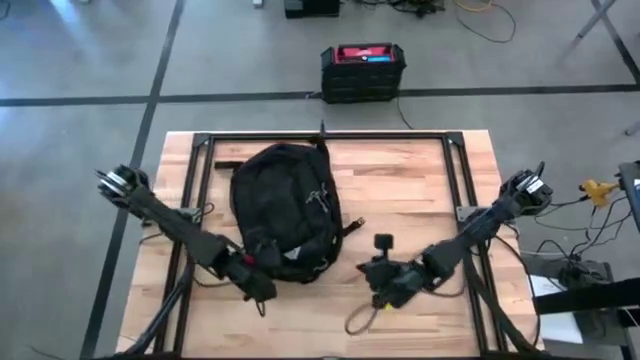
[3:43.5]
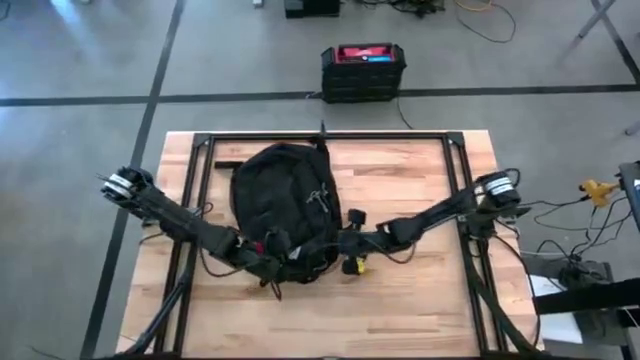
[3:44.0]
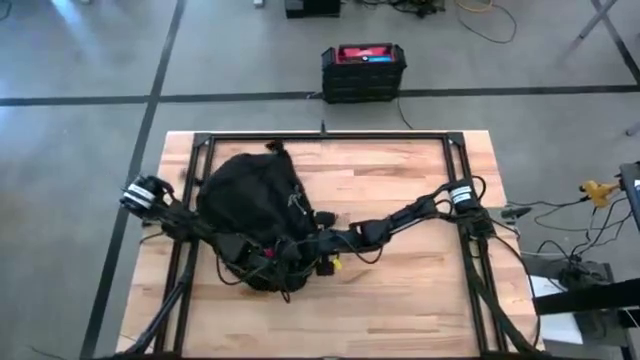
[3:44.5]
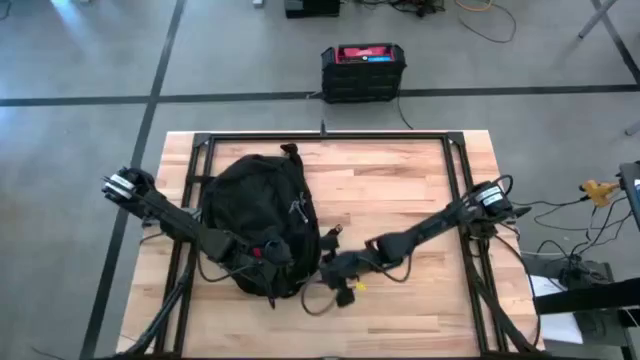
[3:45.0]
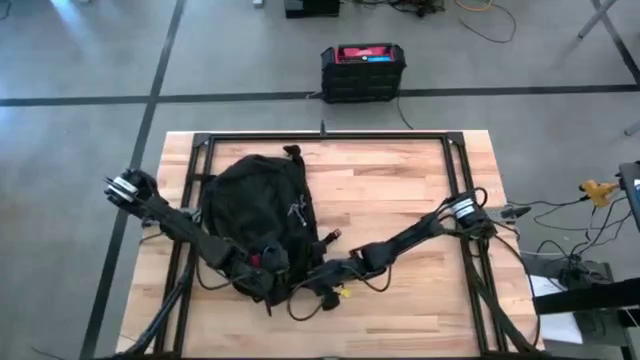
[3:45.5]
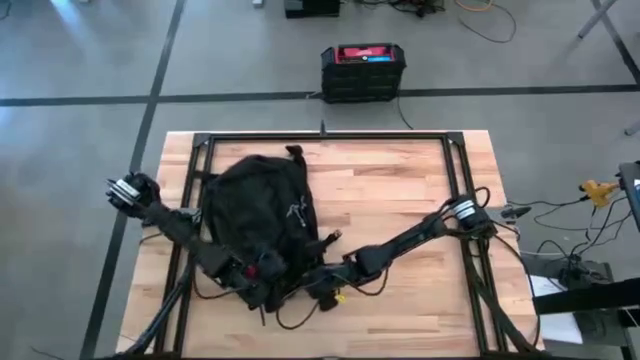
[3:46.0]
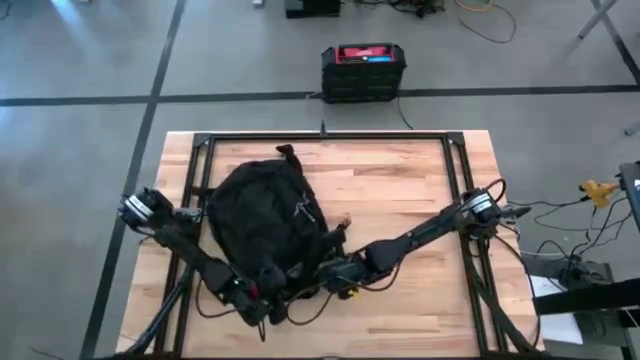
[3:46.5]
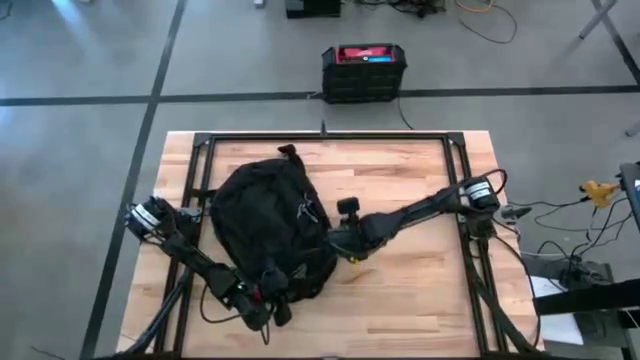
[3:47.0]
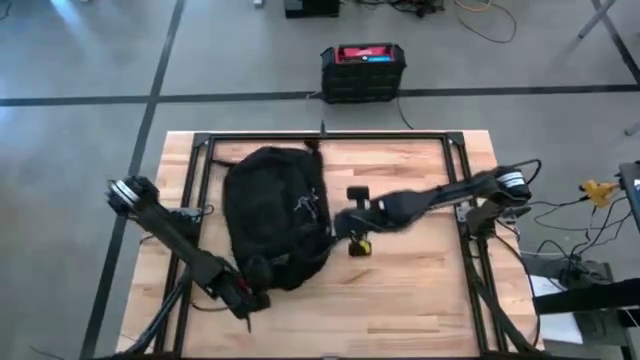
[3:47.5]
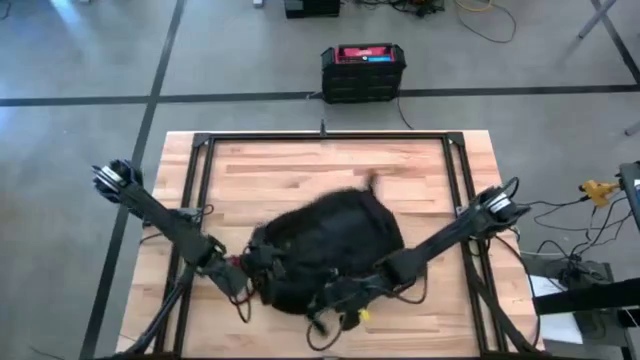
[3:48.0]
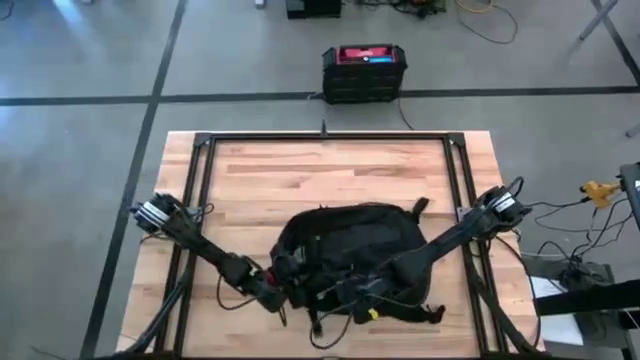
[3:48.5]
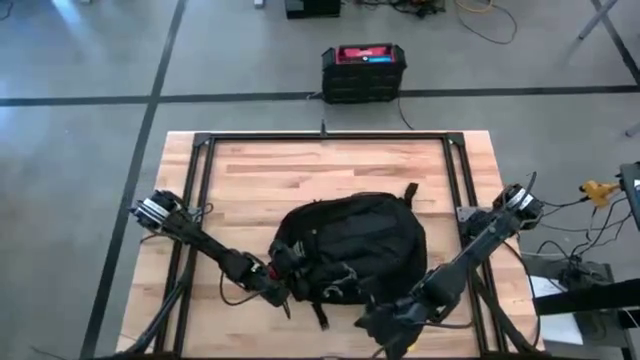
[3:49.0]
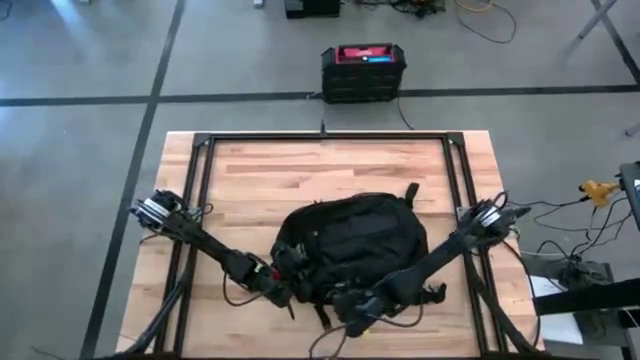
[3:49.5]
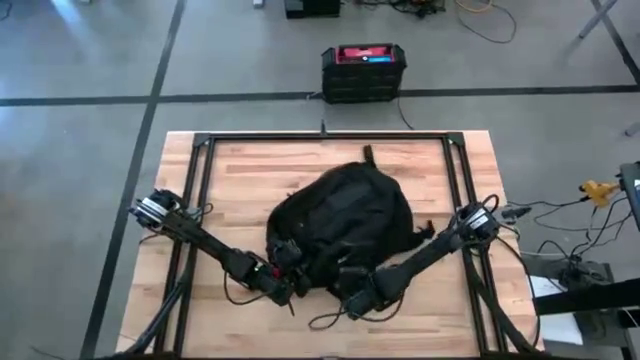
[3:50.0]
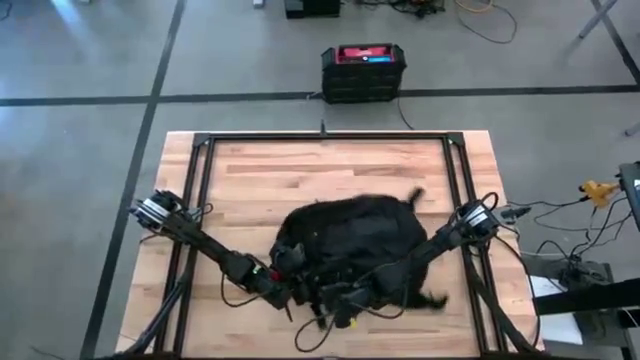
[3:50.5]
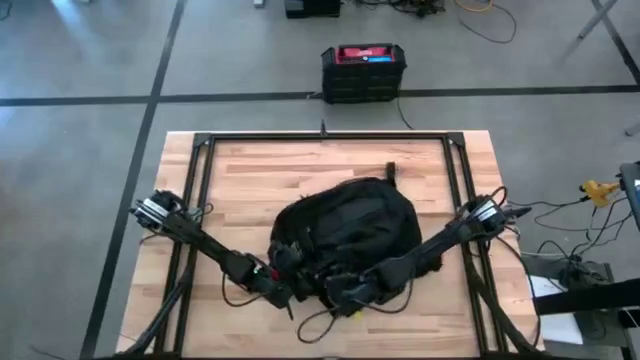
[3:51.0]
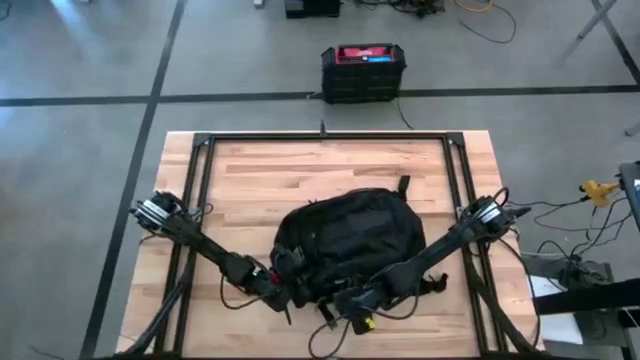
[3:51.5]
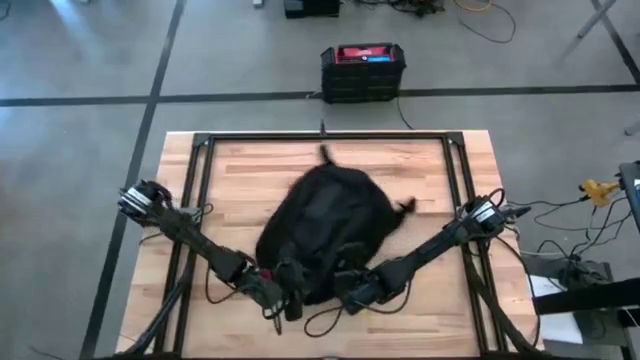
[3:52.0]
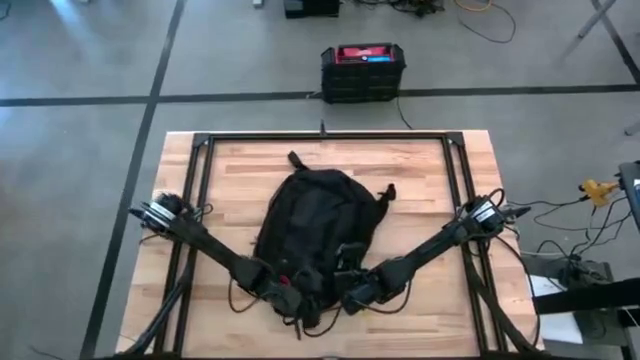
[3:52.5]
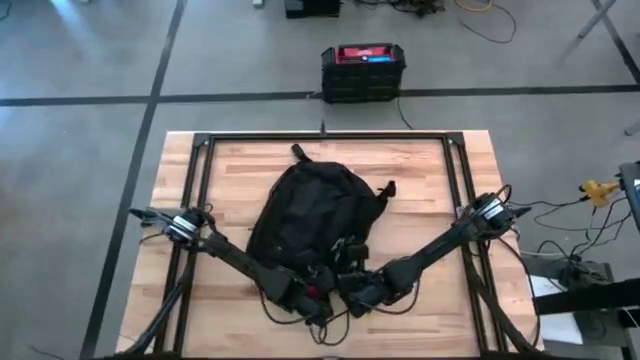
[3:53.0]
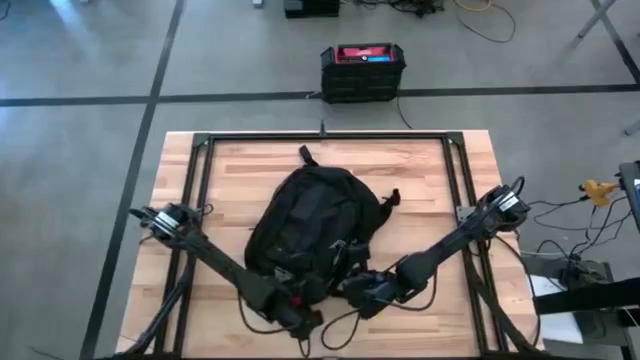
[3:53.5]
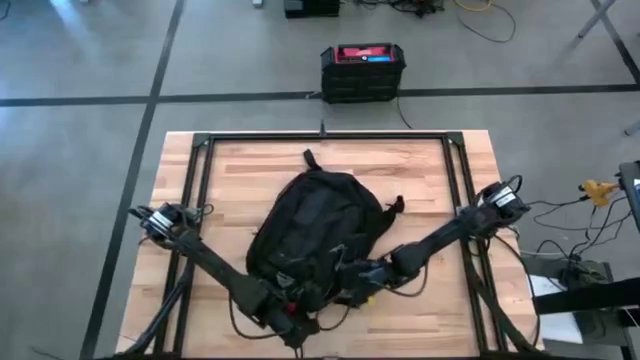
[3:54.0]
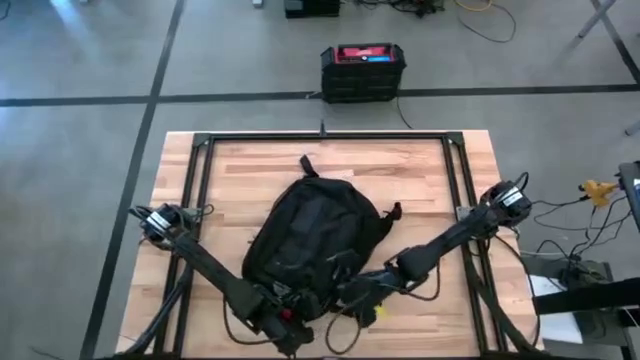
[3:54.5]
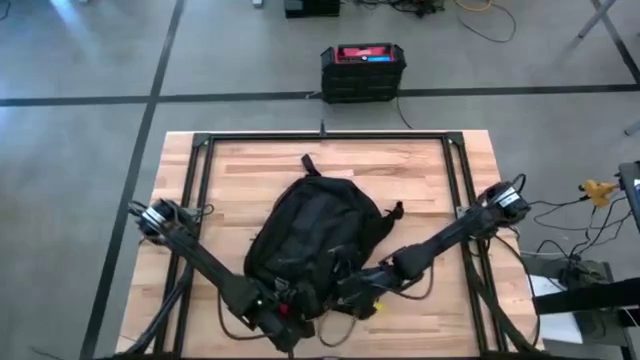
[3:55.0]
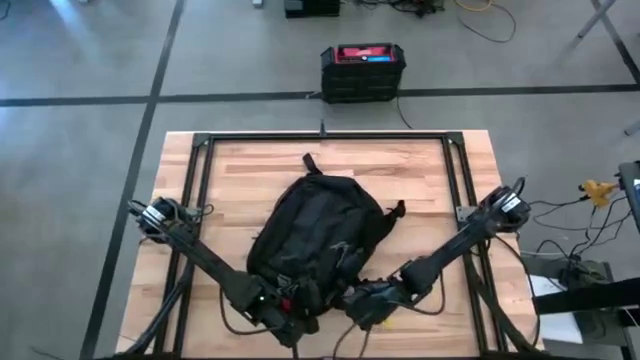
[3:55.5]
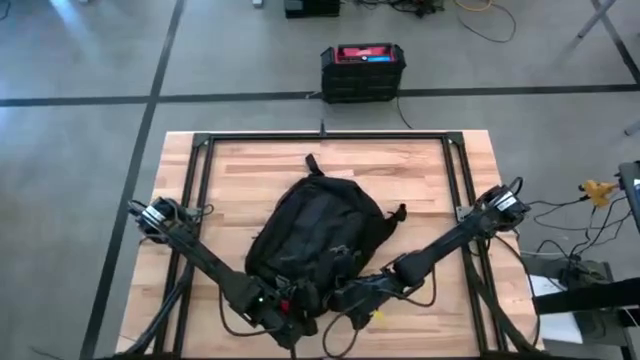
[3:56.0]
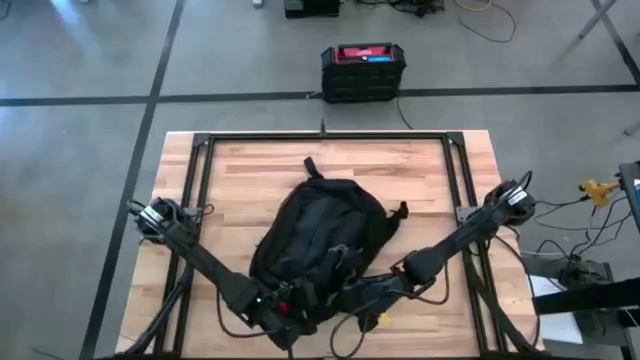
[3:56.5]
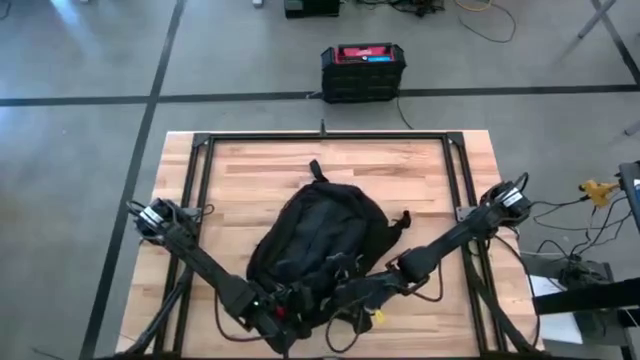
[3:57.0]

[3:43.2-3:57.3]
Task: Unpack backpack
Close the black backpack

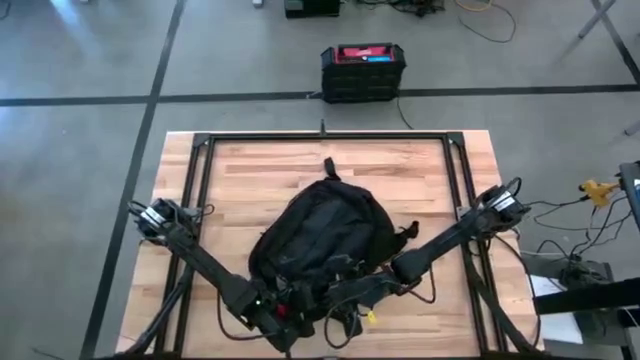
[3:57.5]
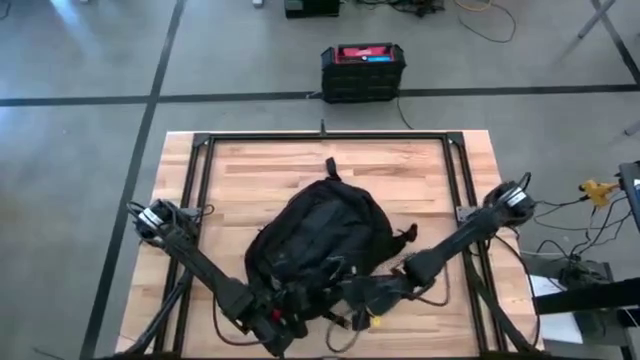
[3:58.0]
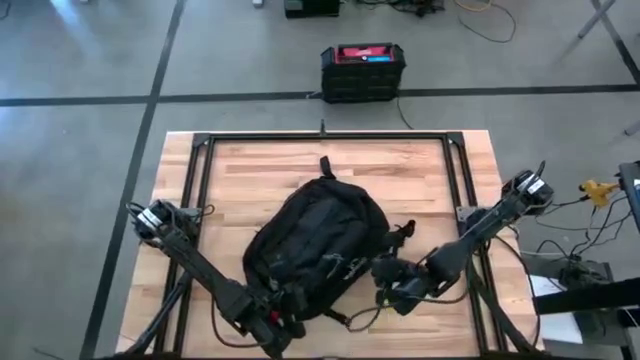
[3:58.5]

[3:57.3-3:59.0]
Close the black backpack

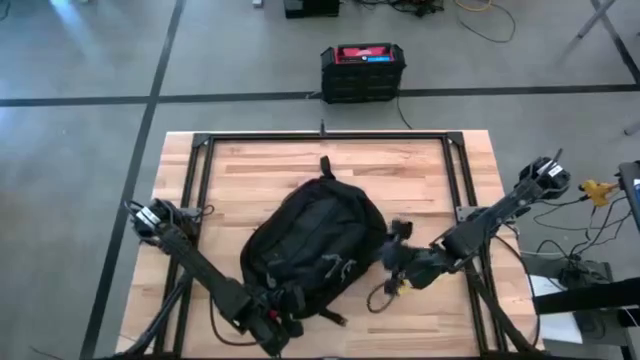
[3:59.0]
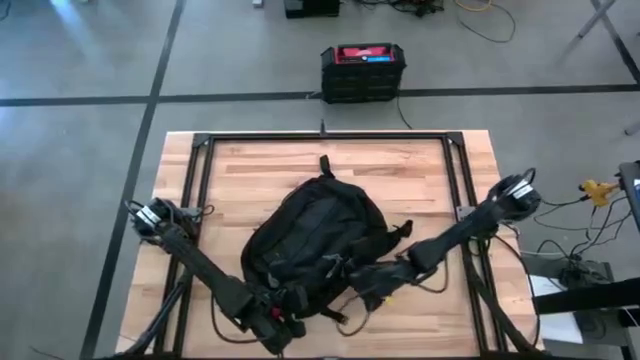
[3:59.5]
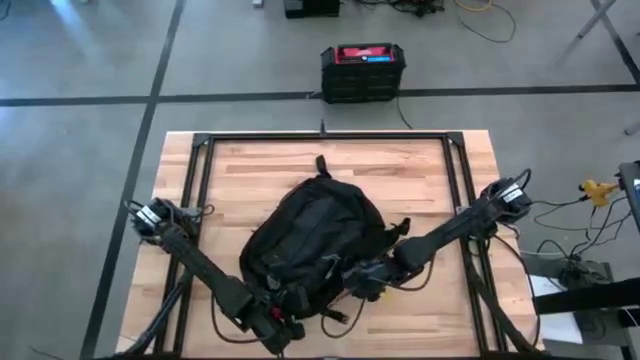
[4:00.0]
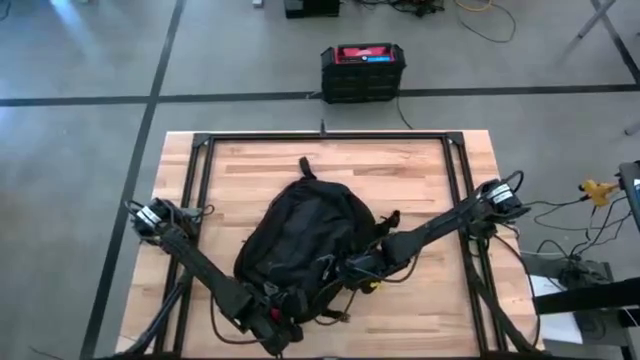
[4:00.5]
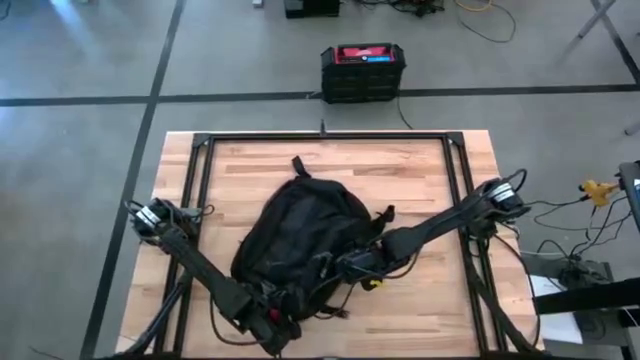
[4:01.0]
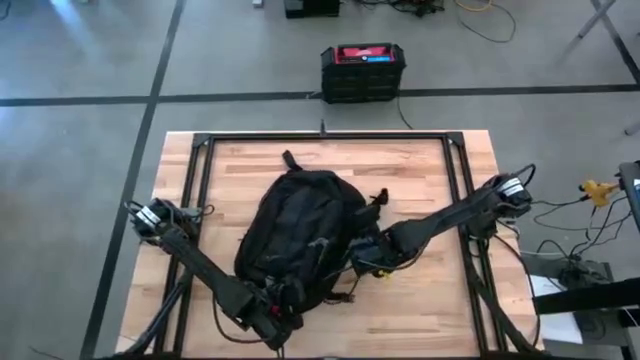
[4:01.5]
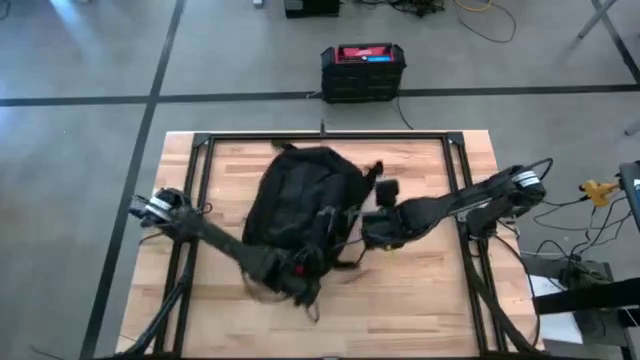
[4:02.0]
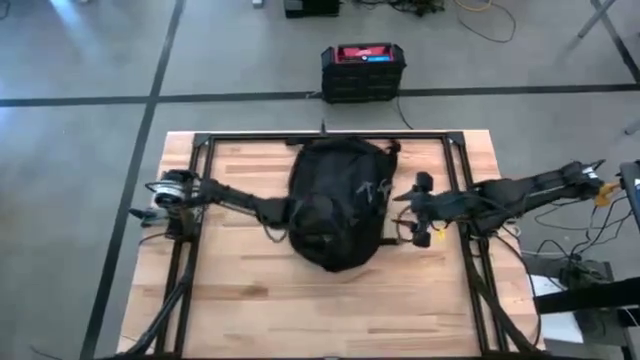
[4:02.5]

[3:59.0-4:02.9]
Close the black backpack

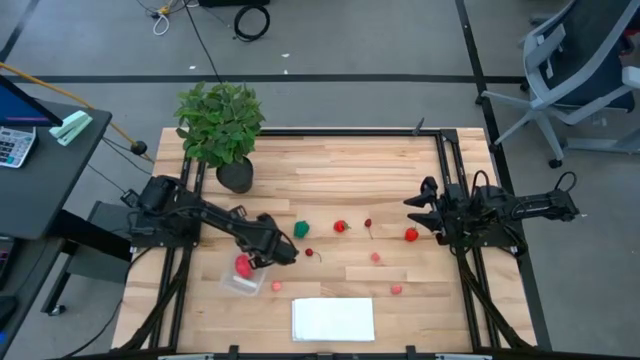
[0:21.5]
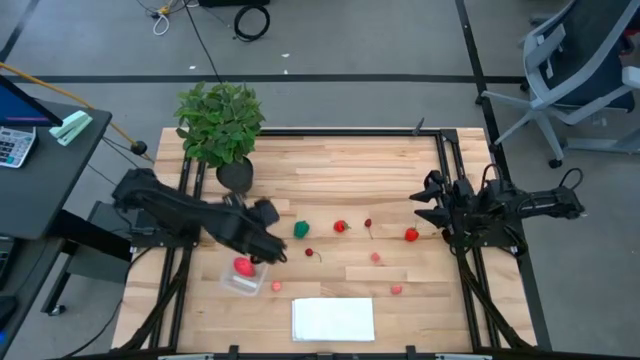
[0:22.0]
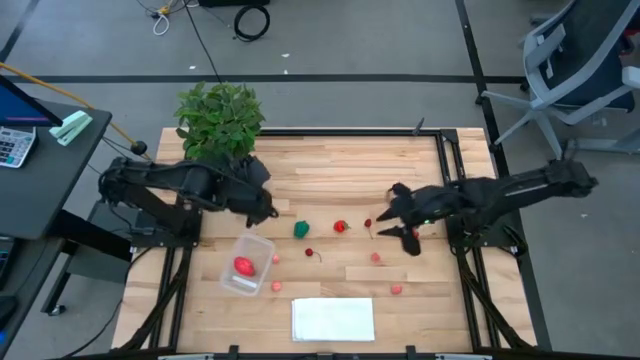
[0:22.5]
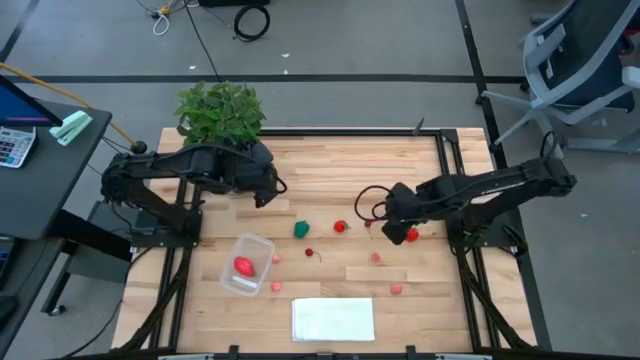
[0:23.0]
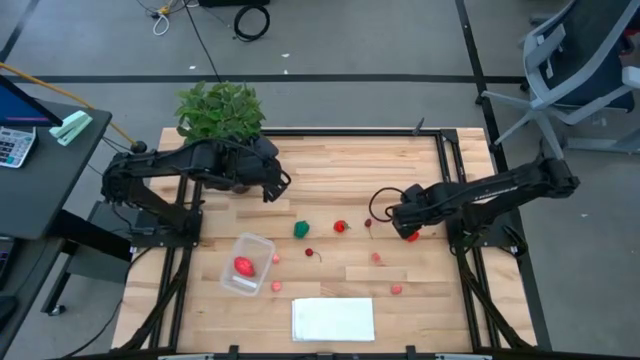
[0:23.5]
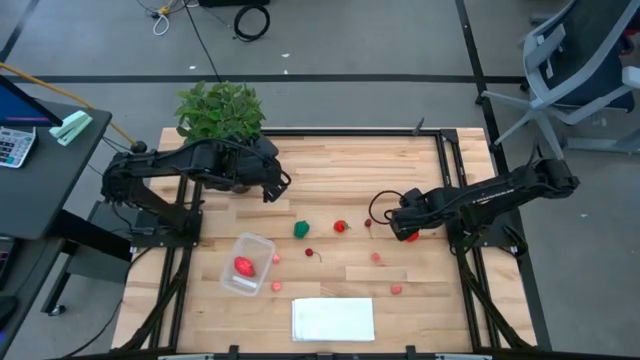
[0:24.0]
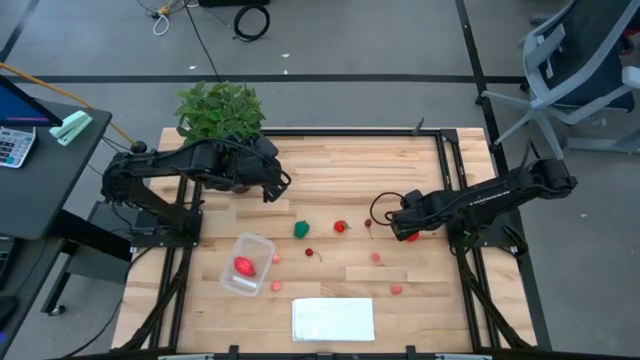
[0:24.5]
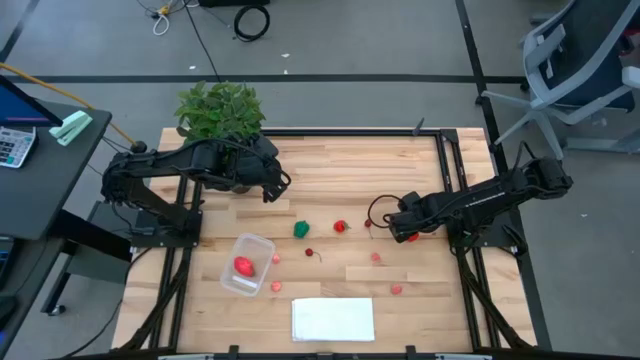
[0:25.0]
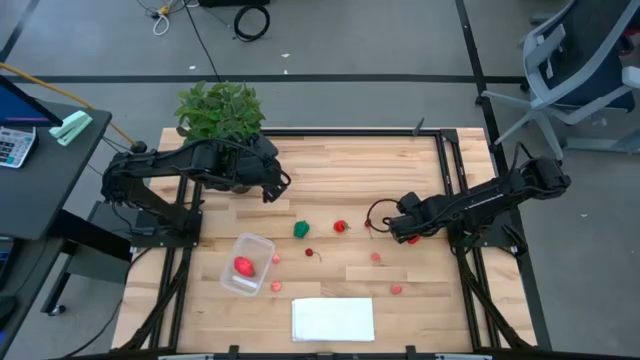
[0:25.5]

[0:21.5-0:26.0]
Task: Pick and placing Produce into tupperware
Put the red strawberry into the transparent bin
